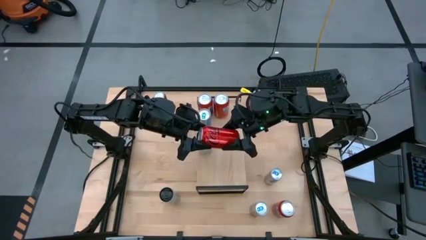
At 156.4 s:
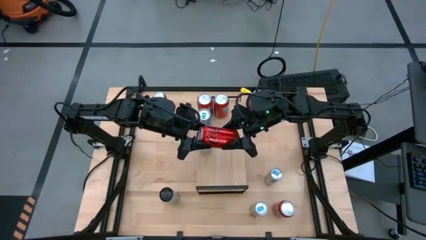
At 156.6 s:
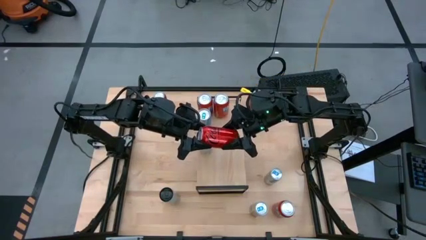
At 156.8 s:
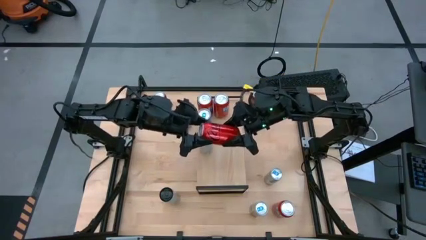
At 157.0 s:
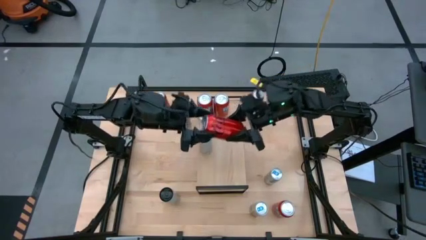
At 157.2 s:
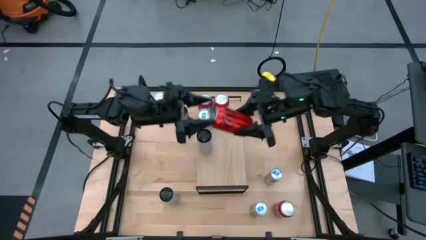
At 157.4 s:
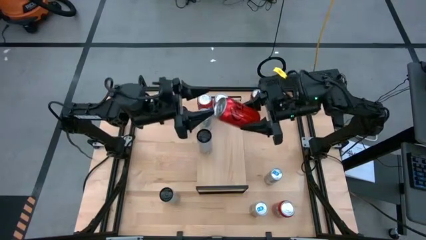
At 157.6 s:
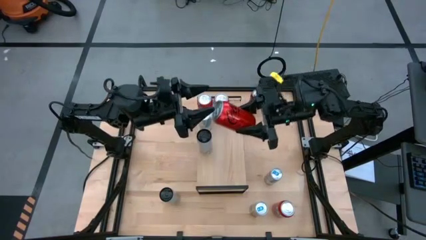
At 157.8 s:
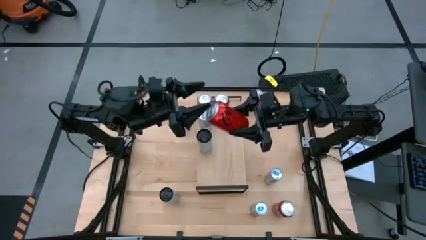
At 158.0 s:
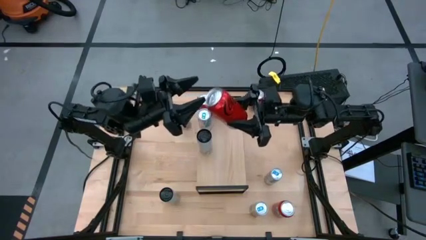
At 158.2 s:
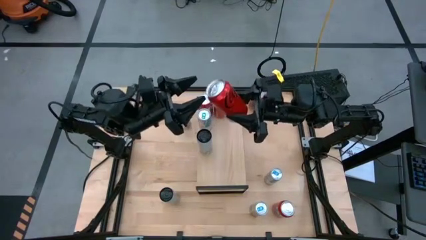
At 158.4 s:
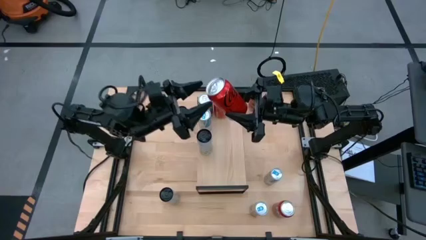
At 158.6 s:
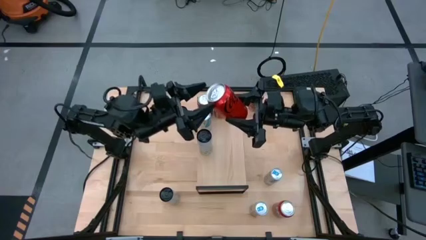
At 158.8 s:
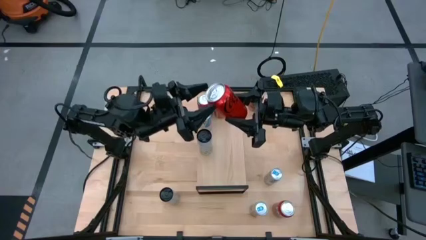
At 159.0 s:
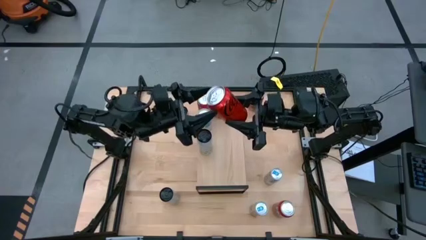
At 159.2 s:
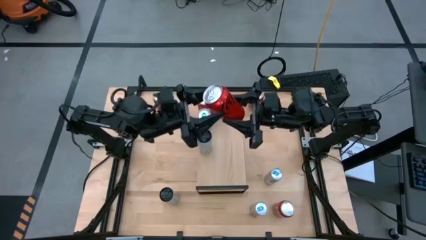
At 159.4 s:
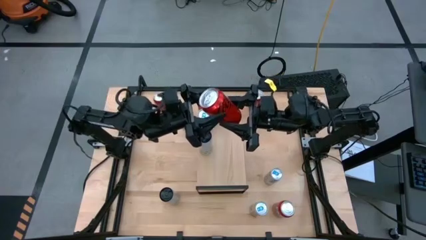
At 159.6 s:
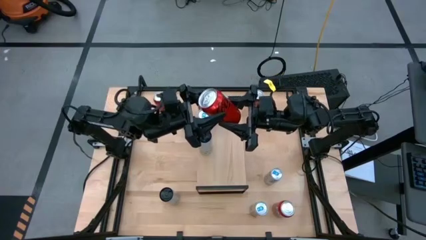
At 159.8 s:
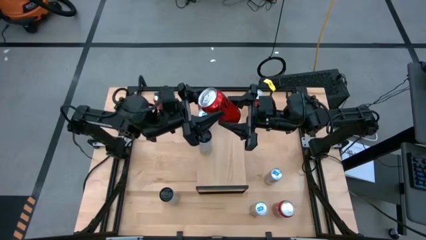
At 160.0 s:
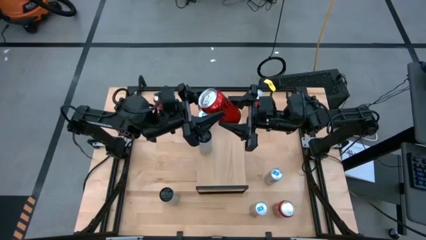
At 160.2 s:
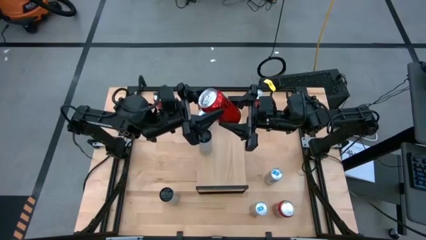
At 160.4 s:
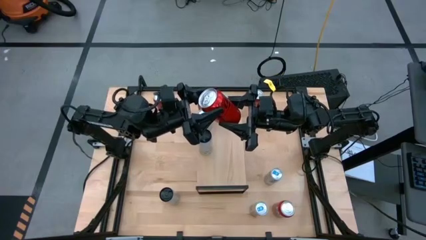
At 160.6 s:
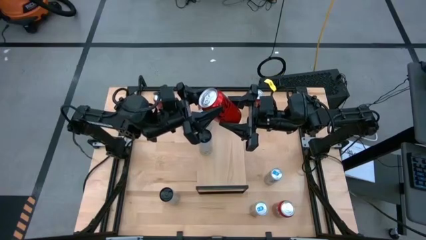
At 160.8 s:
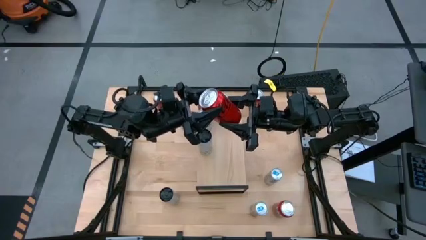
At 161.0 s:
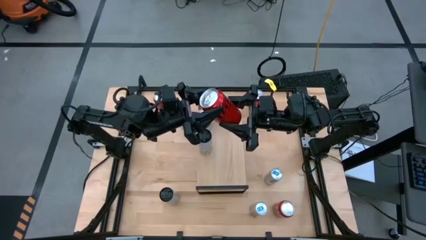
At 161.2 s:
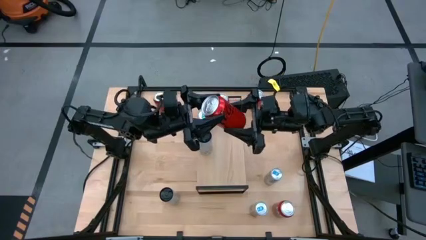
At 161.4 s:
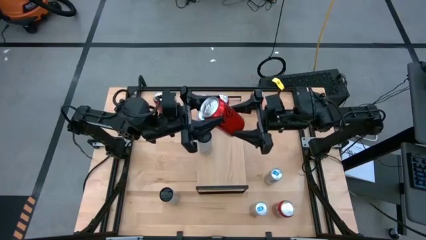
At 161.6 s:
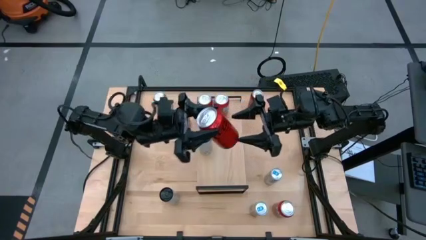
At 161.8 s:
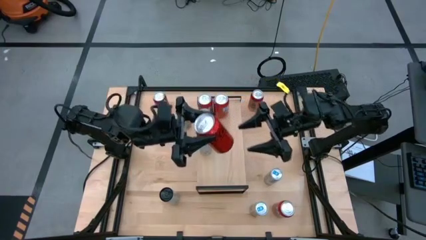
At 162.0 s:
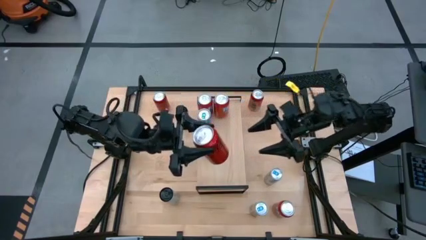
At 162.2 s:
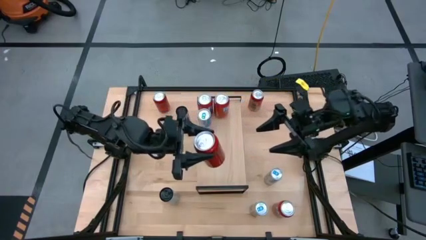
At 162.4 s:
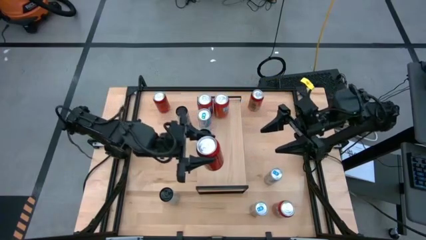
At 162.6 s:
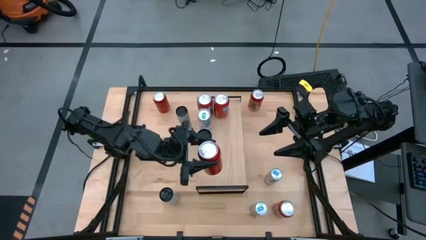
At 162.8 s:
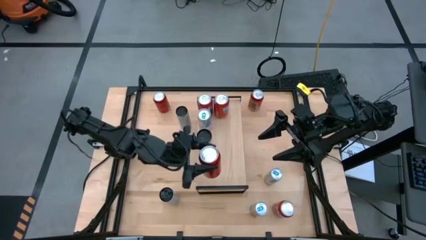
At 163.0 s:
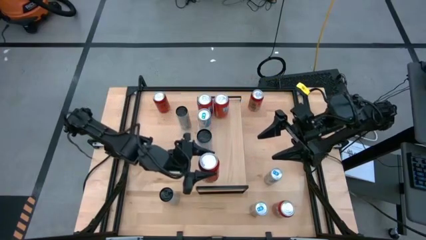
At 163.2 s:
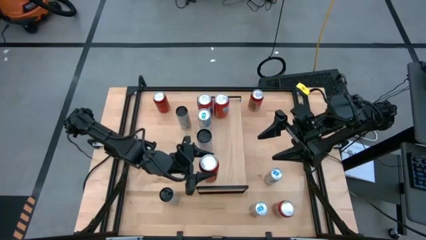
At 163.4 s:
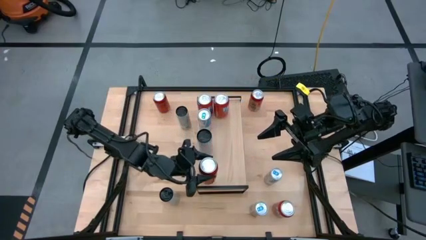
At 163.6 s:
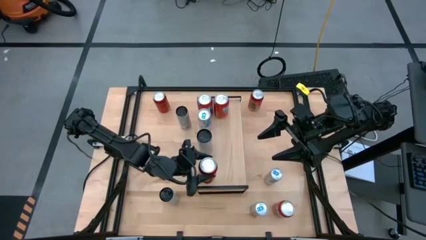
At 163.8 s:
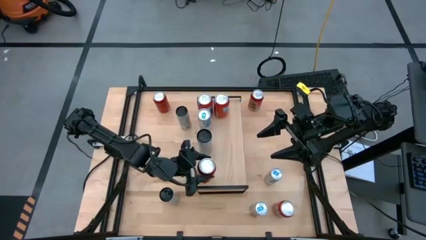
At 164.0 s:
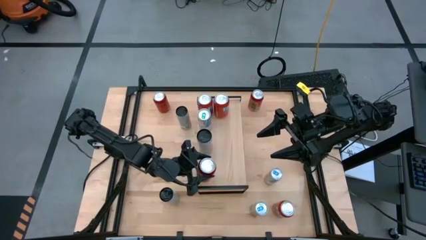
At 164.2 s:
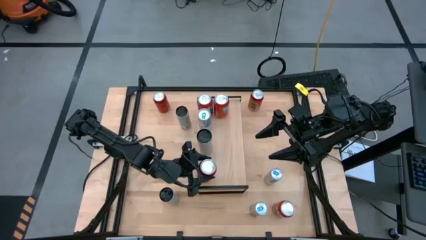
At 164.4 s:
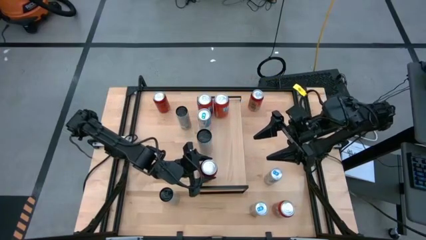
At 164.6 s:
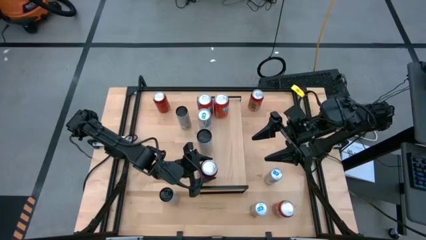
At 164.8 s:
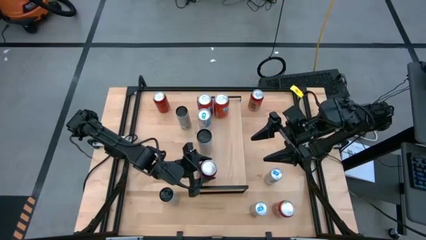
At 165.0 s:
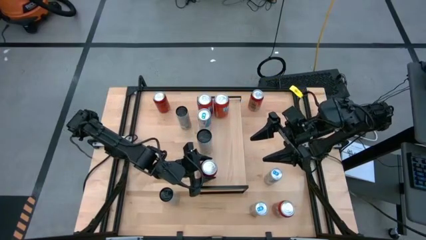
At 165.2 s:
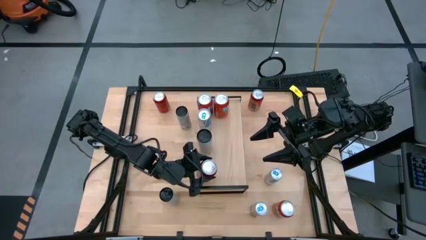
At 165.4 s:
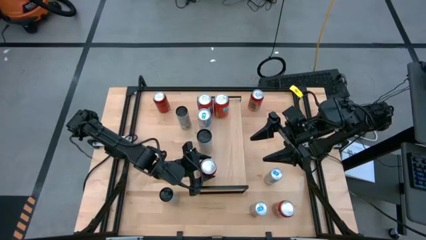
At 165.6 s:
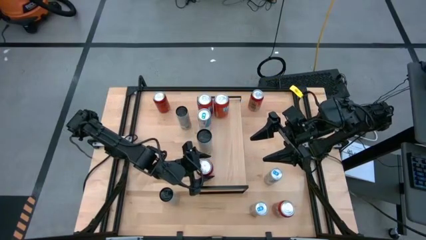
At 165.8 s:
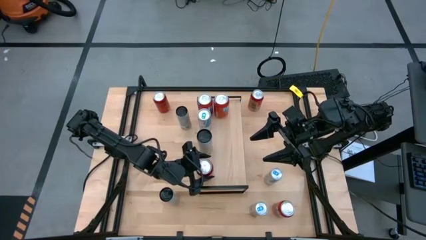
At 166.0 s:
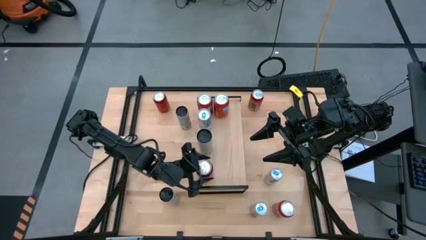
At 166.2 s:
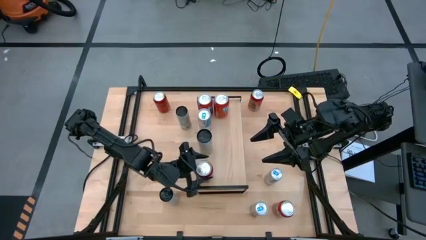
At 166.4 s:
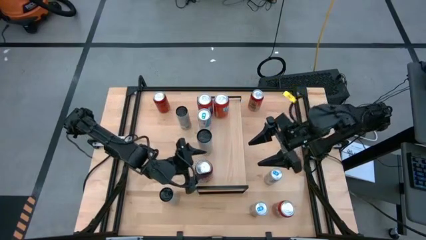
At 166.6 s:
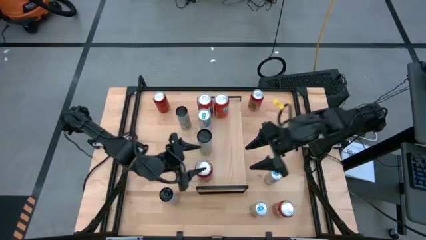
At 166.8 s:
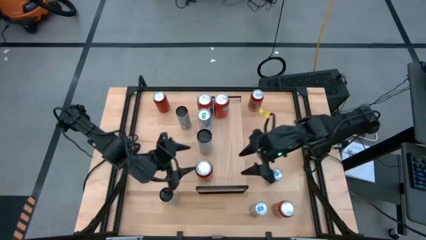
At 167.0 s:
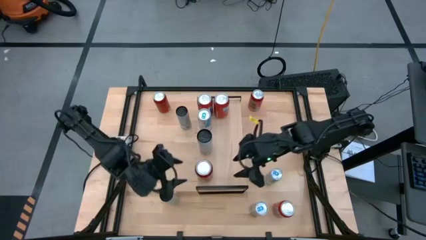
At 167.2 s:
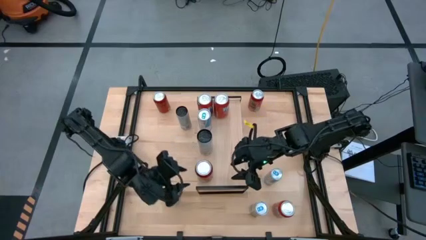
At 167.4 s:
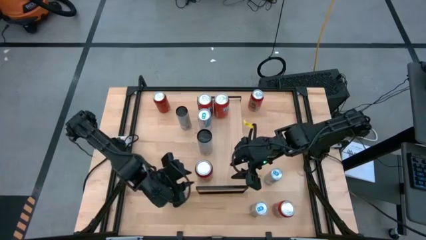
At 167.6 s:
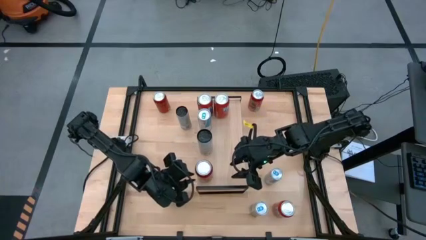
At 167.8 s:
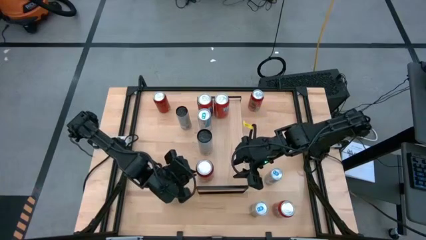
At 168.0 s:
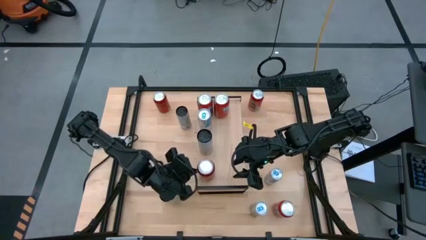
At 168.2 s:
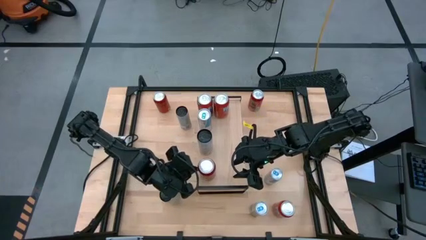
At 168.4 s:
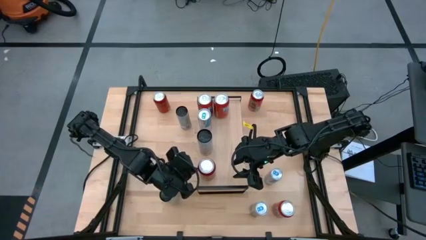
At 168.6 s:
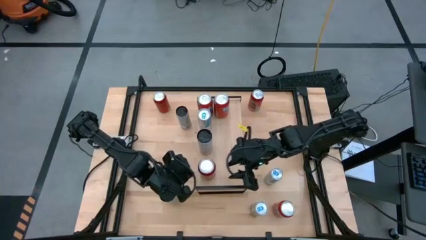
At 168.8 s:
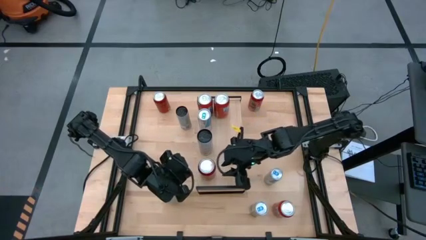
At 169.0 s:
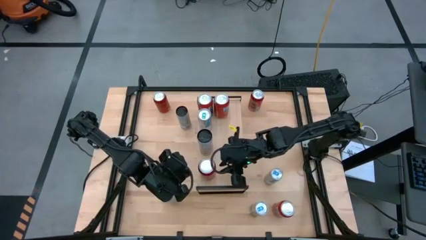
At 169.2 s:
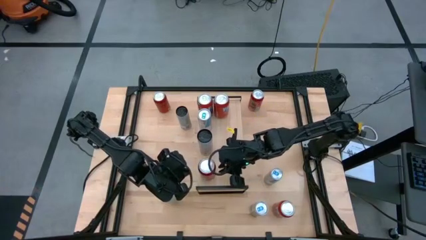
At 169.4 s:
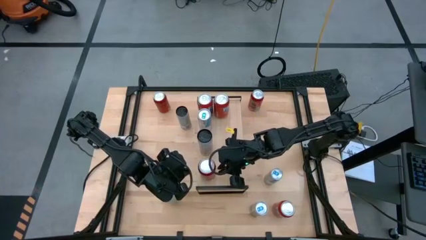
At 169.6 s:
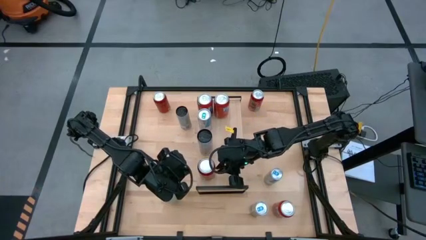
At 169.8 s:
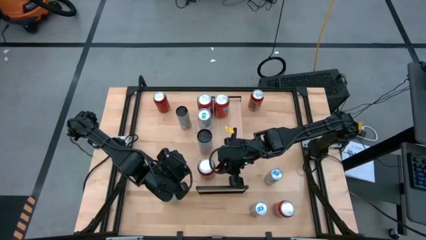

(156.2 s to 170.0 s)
Task: Place canned beverage on shelf
Put the bottom left red soda can on the shelf
